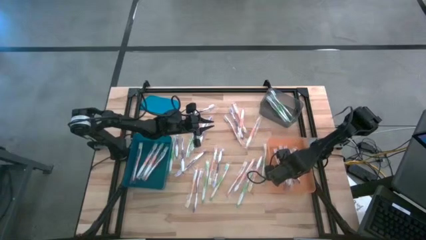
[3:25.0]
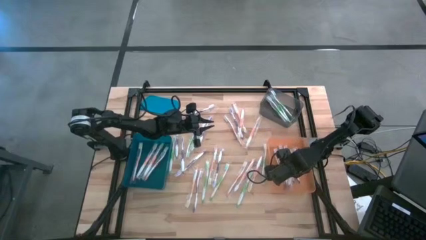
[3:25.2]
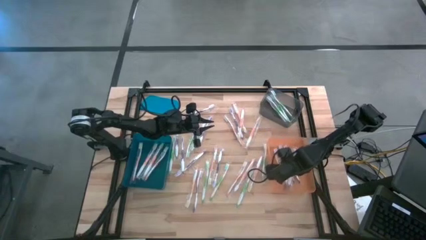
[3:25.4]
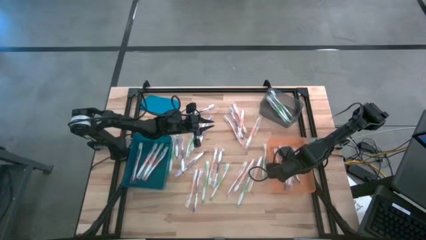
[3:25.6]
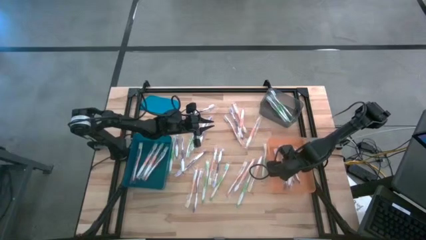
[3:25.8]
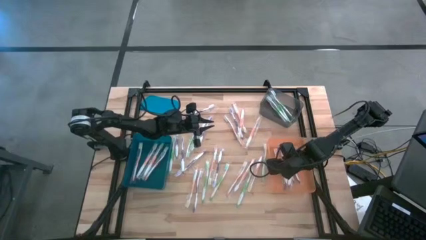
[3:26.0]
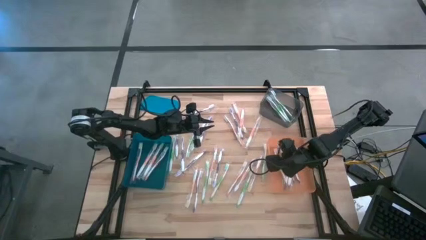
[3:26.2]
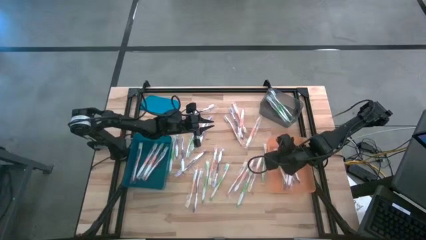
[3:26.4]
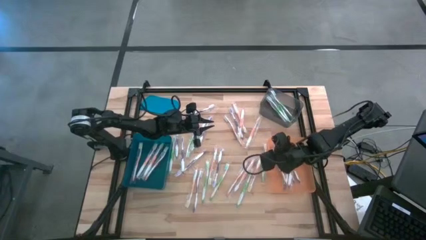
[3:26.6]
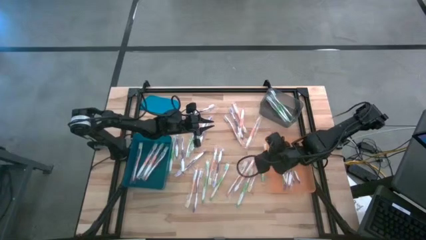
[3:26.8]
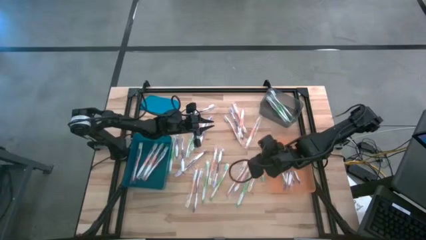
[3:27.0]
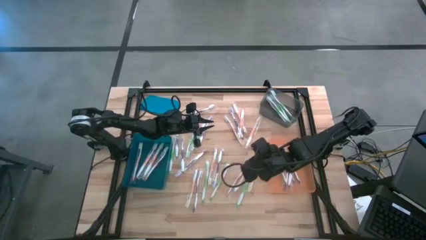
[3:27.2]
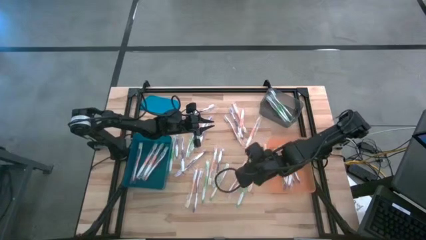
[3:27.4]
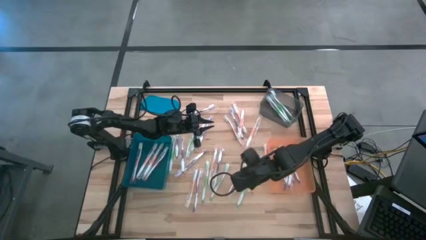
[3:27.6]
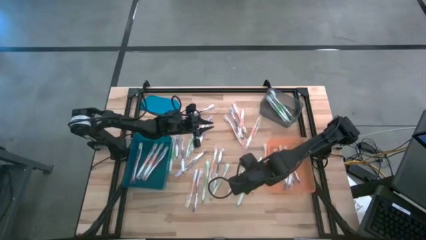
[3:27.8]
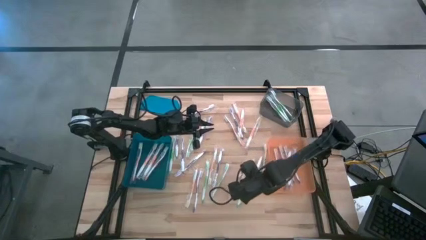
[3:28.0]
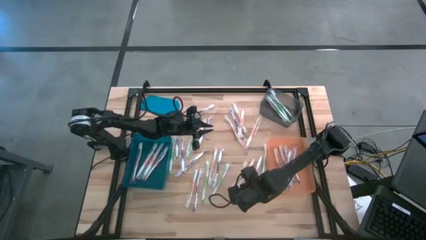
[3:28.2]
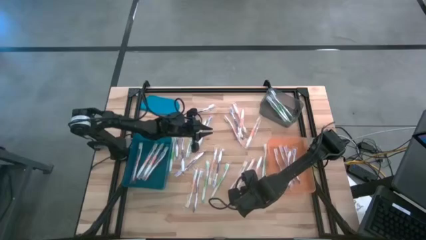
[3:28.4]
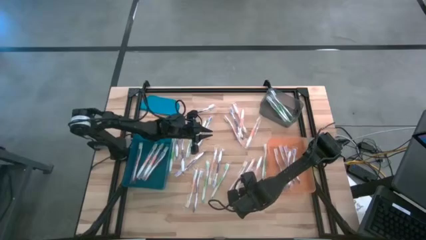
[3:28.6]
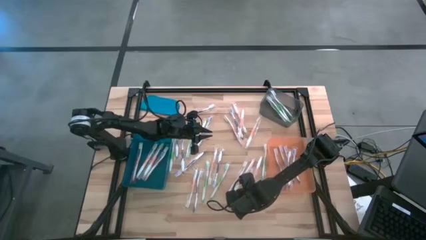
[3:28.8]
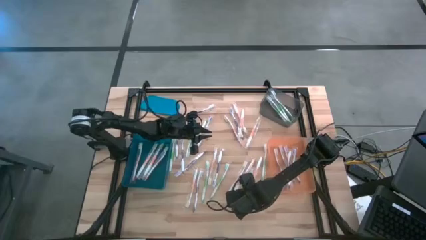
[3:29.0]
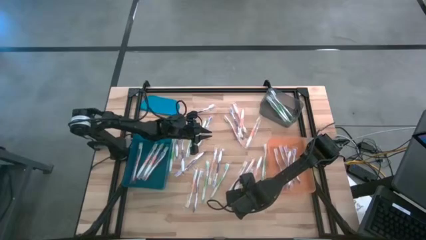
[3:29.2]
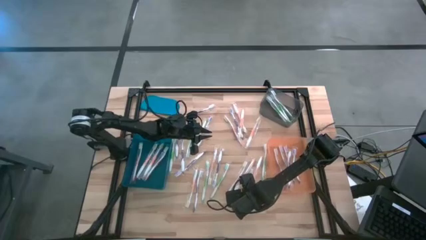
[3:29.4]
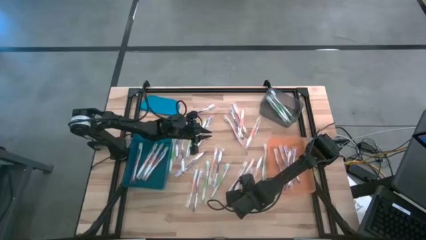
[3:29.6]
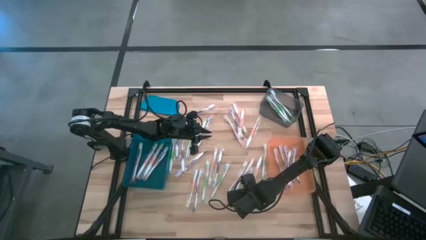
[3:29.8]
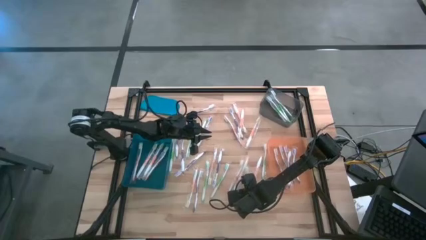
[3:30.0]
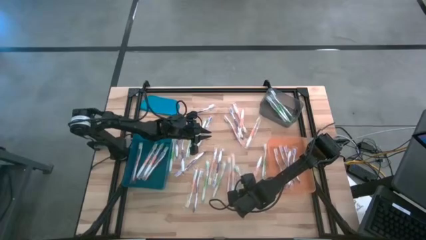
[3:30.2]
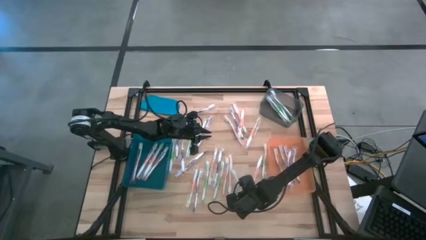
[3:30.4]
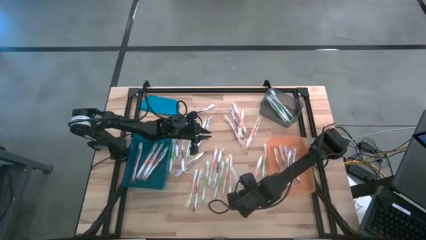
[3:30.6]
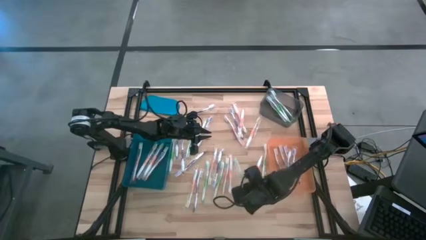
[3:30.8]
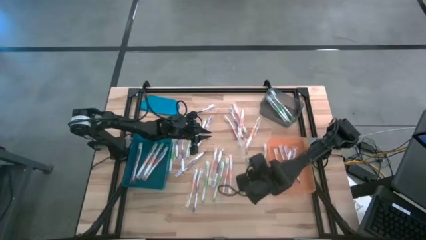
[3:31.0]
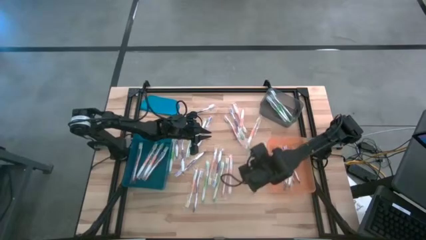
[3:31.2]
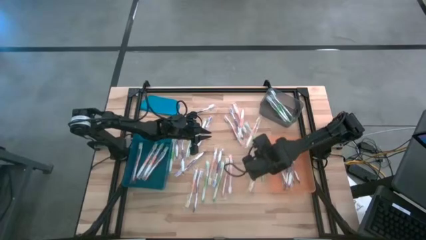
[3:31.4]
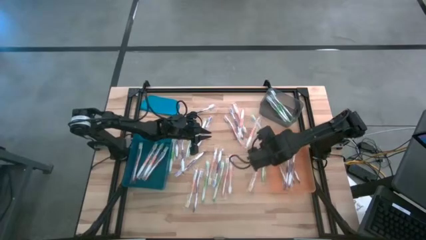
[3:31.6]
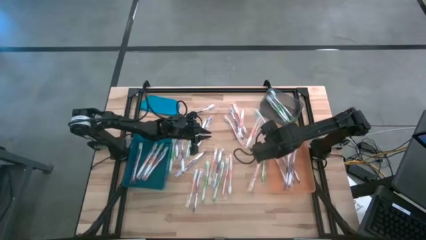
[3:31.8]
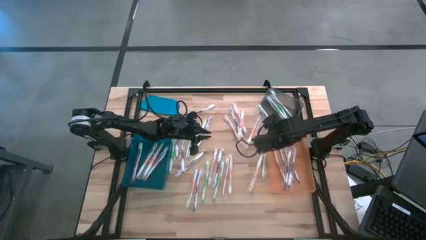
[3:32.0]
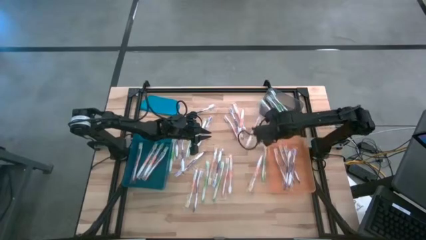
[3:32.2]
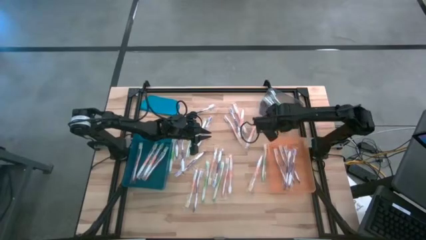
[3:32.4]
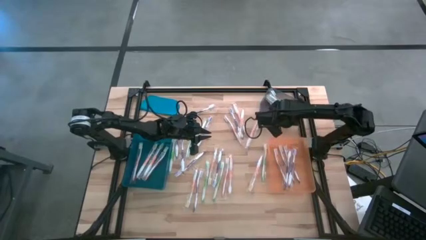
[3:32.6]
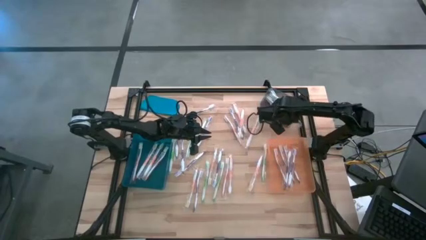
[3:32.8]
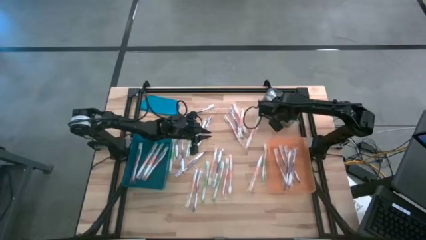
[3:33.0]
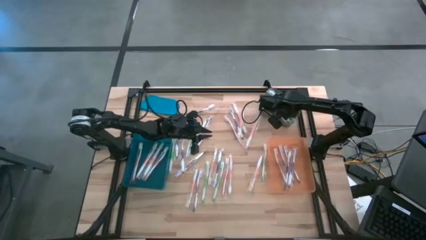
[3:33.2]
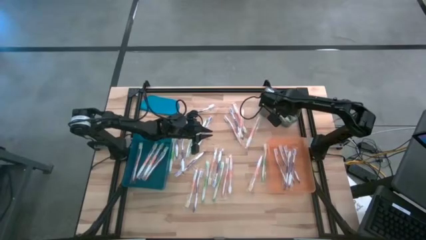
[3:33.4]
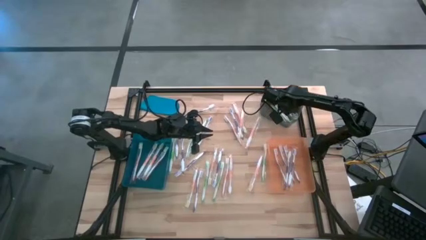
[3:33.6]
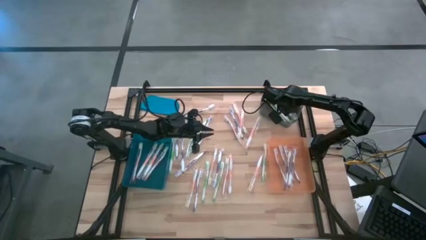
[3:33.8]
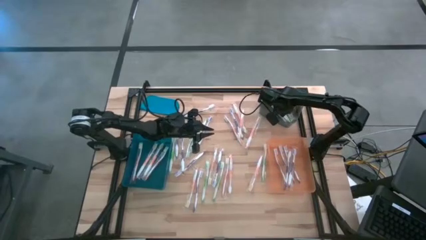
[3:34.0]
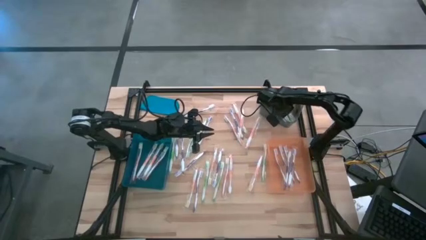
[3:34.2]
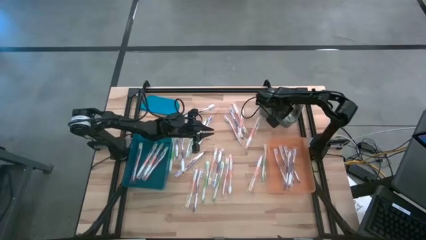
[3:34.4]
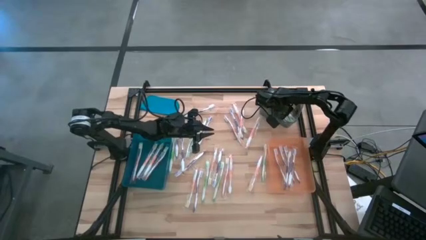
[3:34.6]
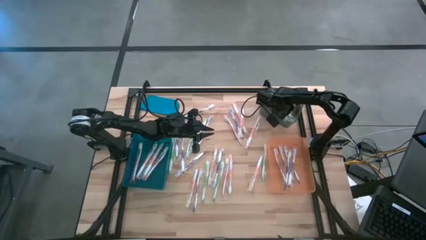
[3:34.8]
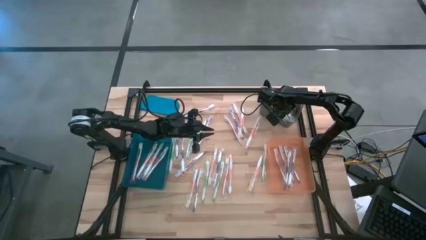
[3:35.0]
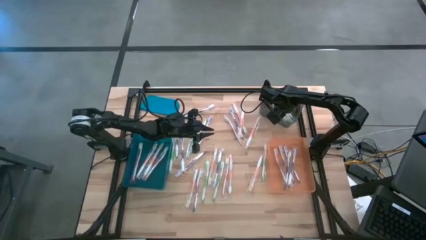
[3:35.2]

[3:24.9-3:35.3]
Task: Pick & Place Toothbrushes
Put the green toothbrush into the black bin
